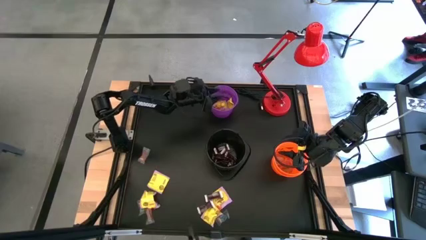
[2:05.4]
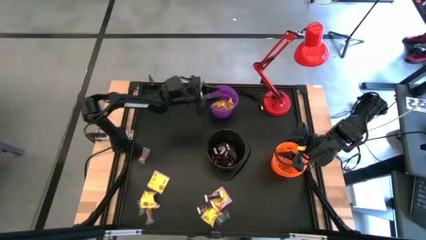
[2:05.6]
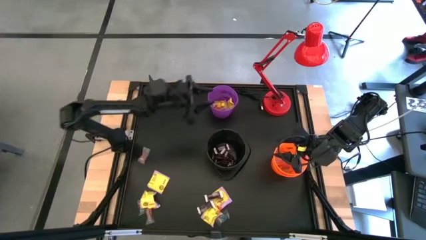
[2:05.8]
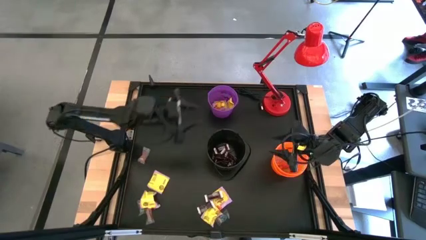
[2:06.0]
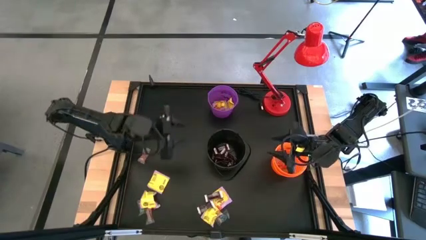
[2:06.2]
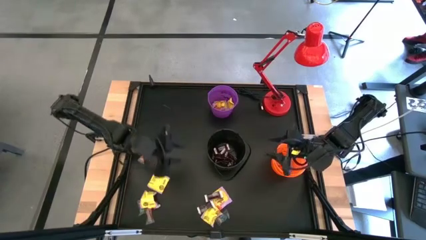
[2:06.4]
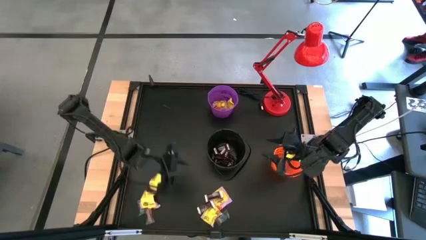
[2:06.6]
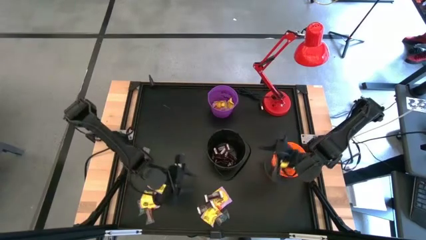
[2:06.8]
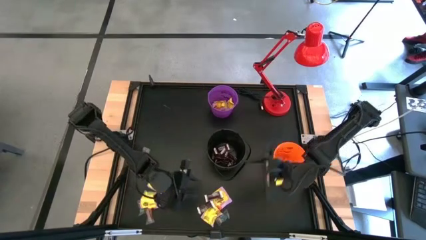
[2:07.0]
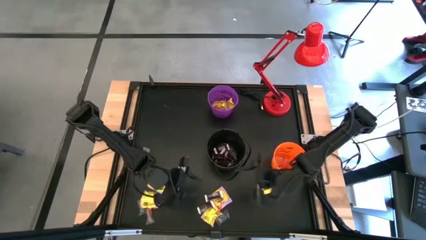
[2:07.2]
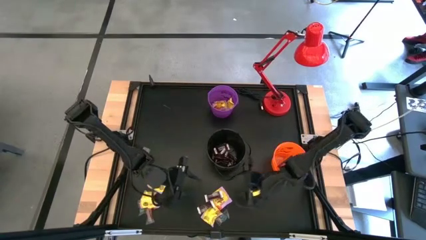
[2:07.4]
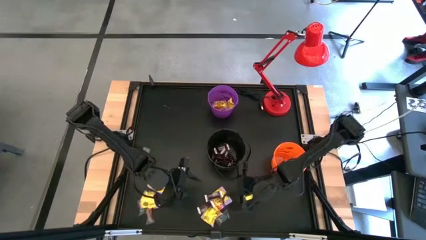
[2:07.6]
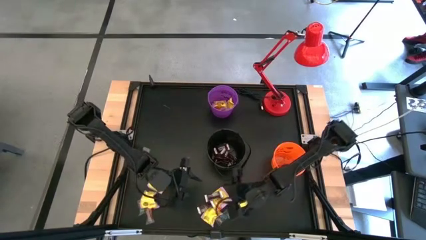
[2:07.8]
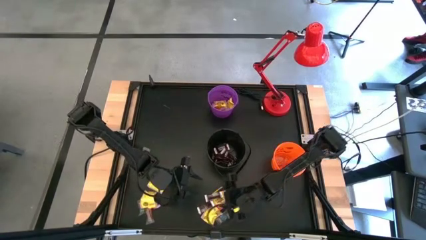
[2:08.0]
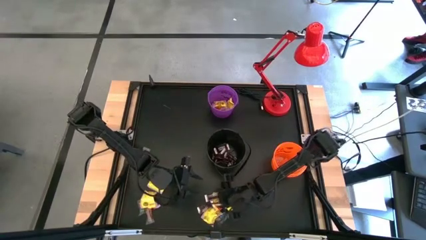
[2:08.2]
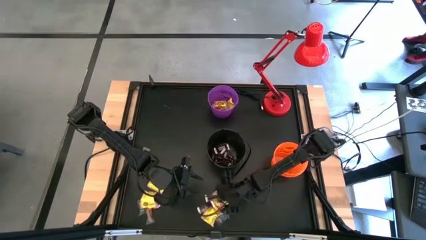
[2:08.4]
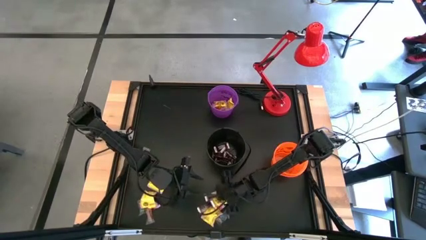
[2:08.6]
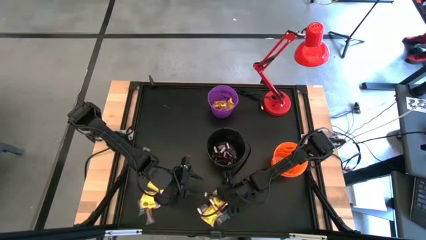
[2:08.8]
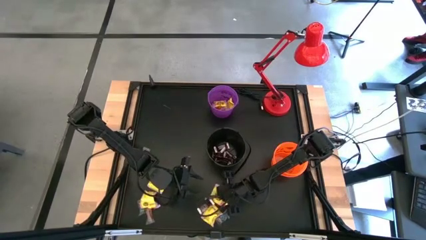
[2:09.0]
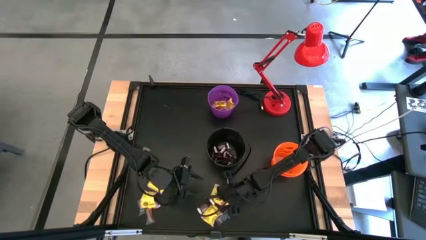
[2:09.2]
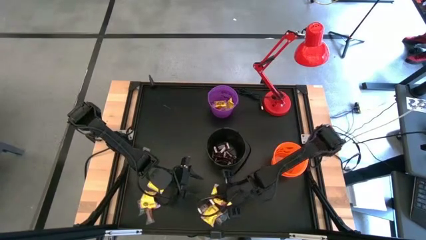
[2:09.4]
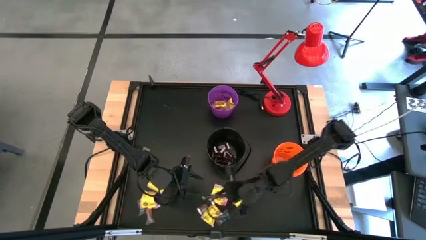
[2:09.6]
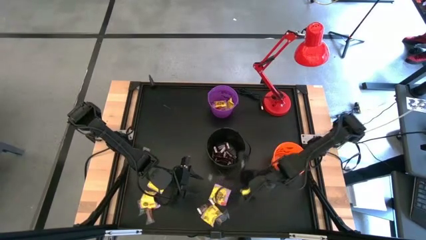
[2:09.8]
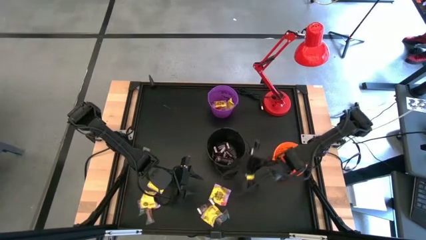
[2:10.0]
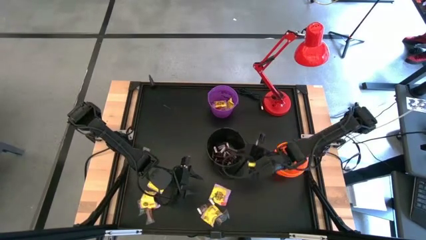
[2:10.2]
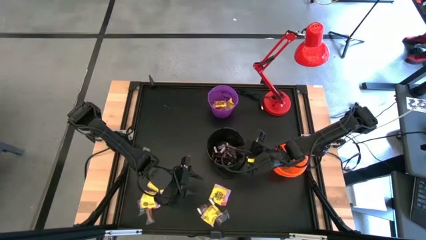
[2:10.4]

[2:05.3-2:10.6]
Task: Sort candy
Put the brown chocolate into the black bucket

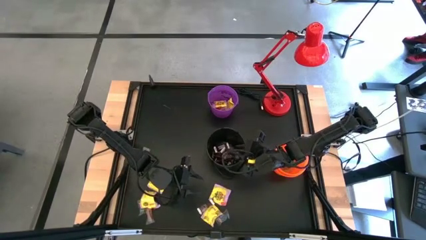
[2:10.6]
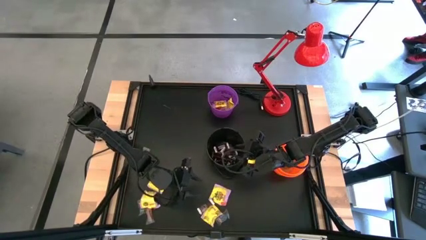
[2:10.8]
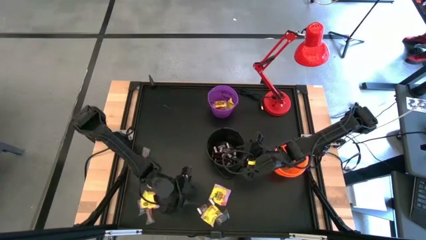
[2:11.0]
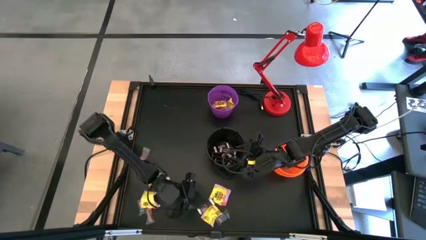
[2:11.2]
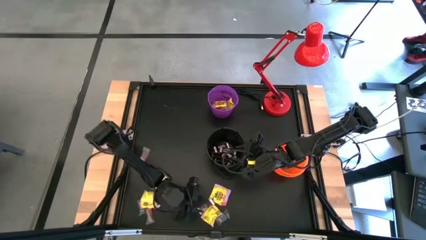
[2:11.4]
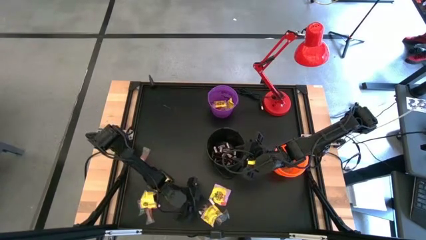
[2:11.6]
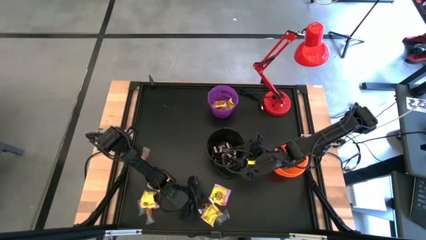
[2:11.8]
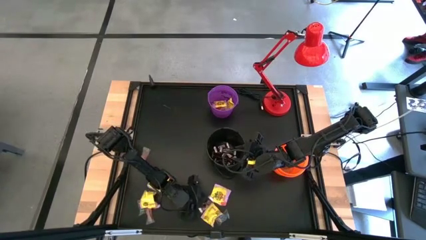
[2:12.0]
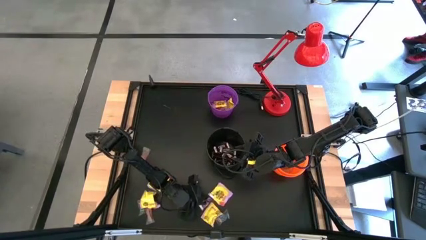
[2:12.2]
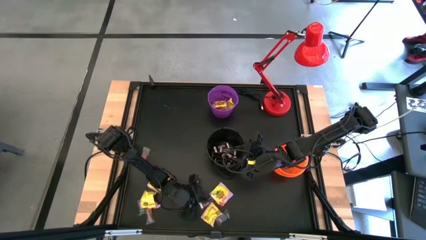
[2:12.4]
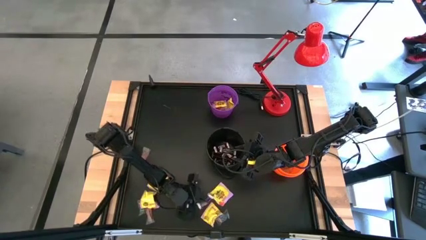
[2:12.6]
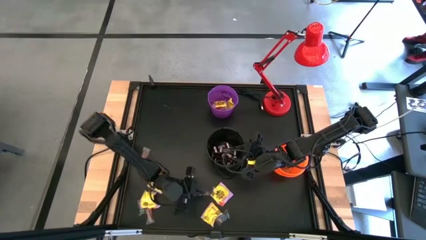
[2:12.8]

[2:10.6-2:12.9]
Put the brown chocolate into the black bucket

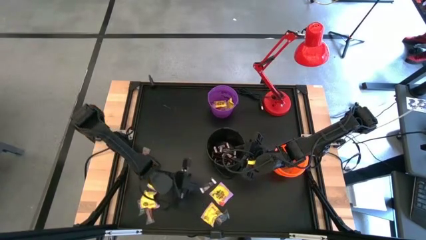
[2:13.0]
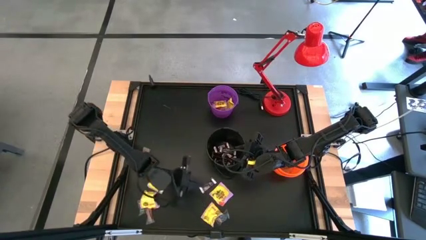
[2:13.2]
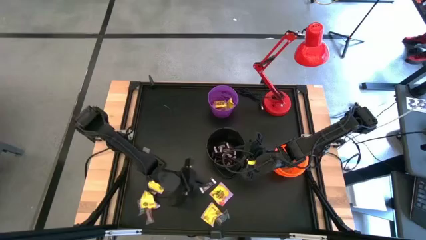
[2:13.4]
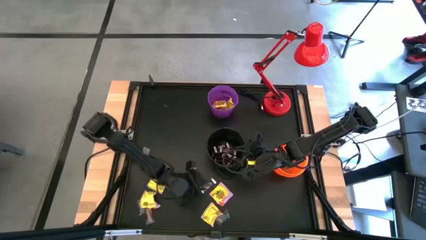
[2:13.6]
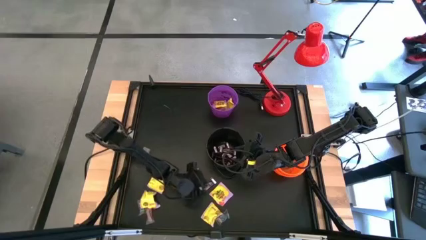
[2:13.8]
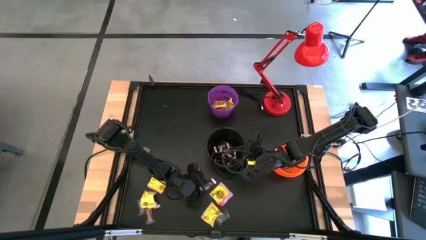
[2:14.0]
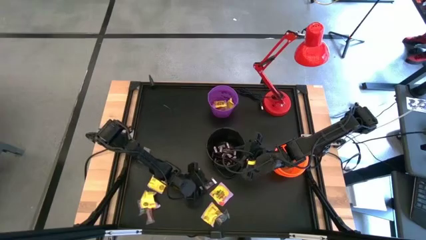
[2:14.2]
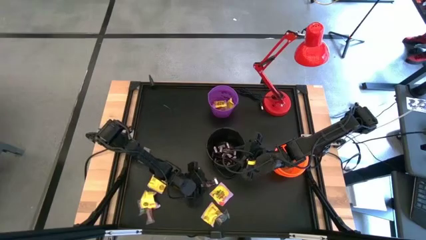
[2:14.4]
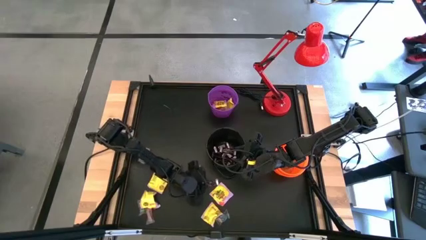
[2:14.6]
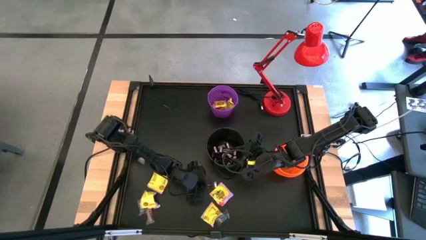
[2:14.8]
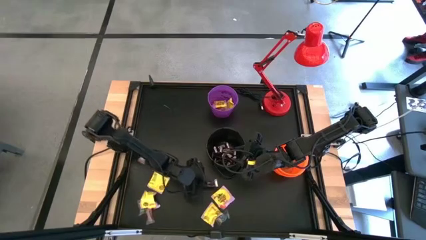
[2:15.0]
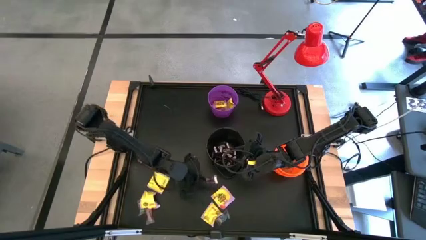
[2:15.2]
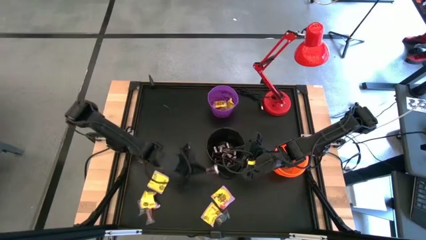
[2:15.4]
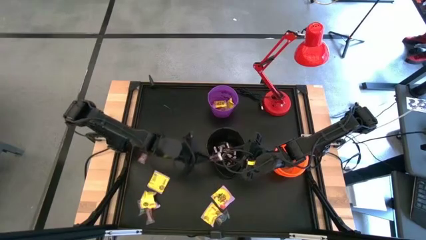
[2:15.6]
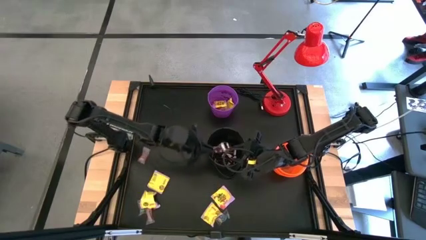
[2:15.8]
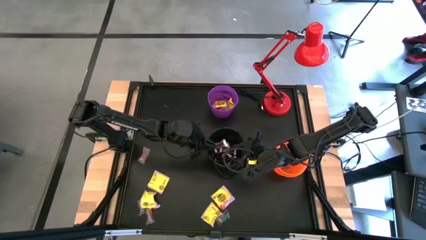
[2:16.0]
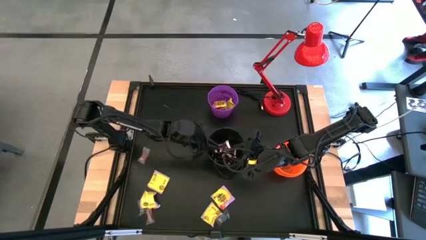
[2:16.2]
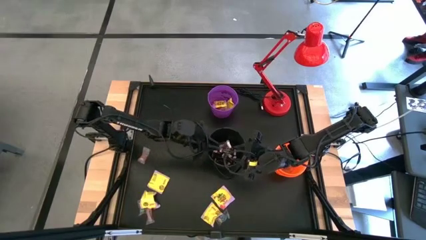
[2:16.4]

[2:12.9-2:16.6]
Put the brown chocolate into the black bucket

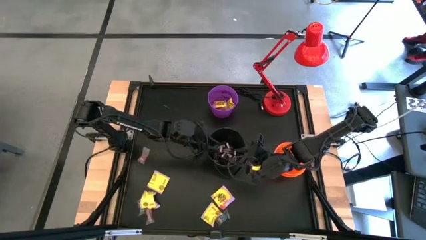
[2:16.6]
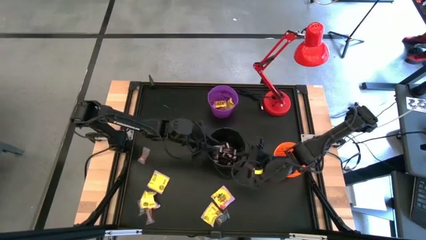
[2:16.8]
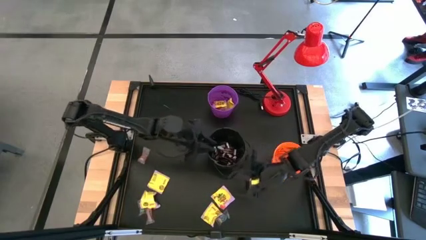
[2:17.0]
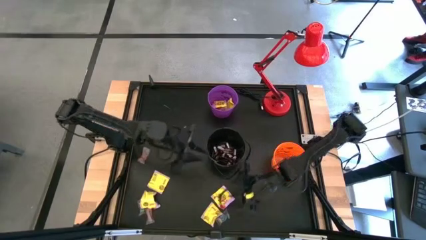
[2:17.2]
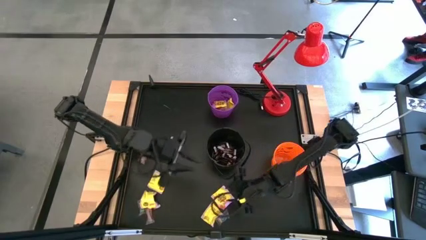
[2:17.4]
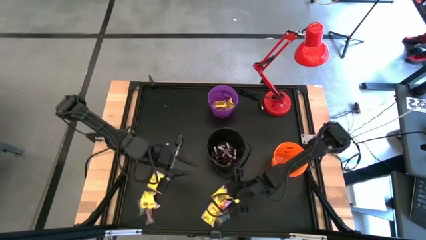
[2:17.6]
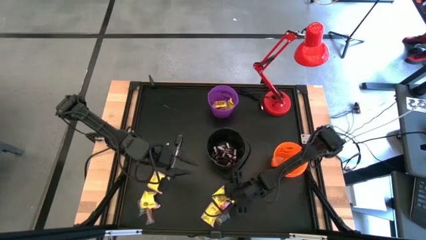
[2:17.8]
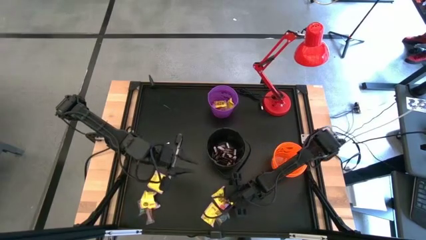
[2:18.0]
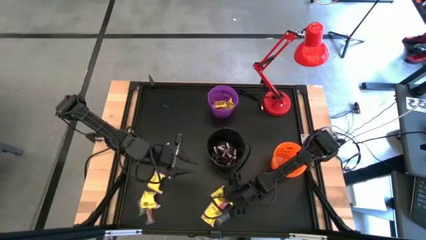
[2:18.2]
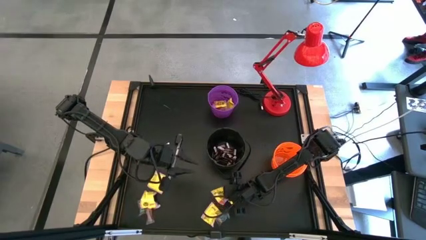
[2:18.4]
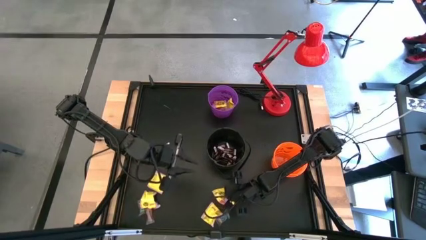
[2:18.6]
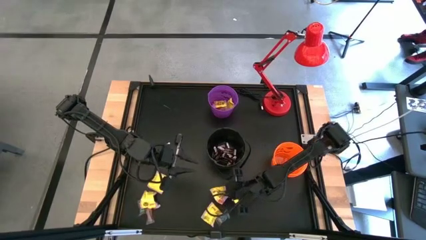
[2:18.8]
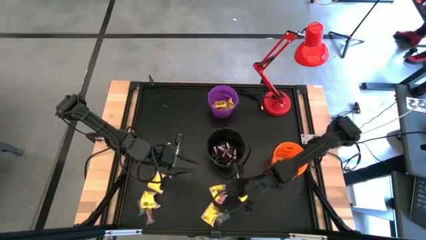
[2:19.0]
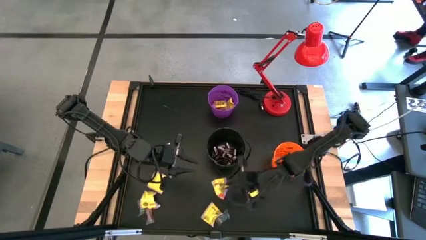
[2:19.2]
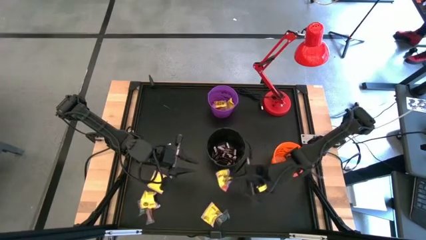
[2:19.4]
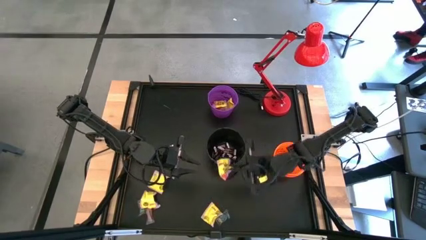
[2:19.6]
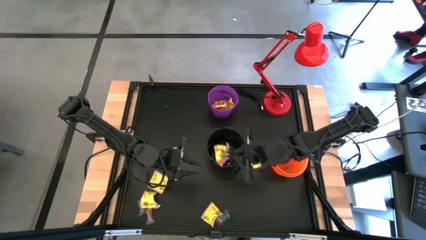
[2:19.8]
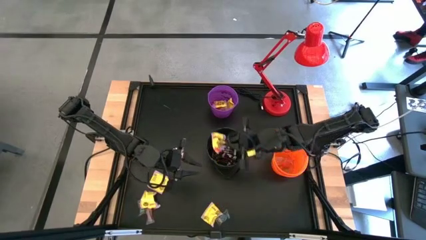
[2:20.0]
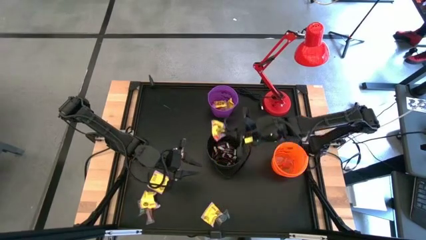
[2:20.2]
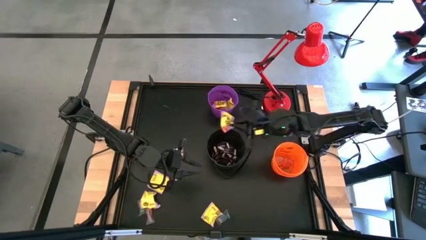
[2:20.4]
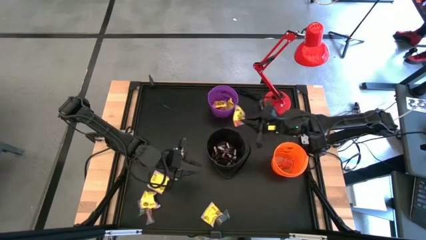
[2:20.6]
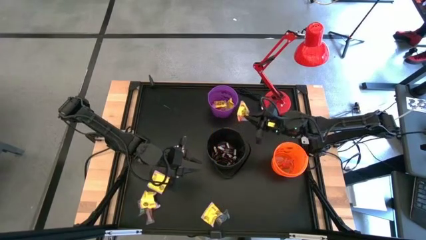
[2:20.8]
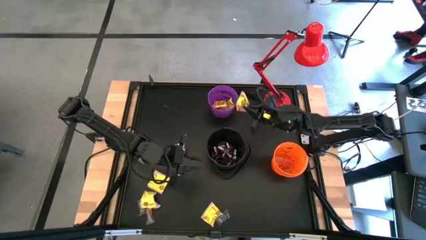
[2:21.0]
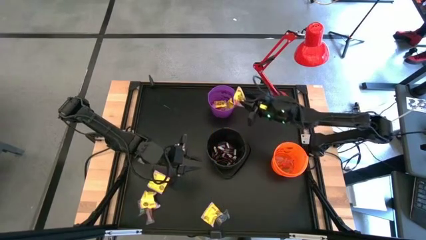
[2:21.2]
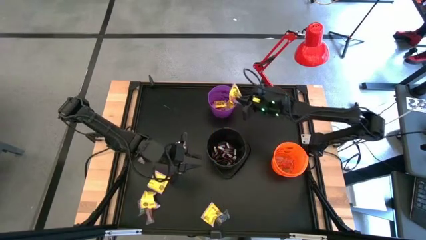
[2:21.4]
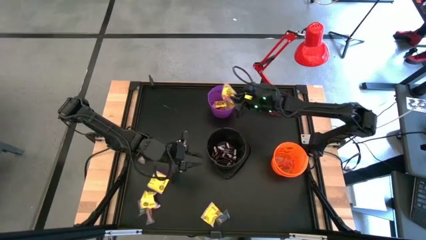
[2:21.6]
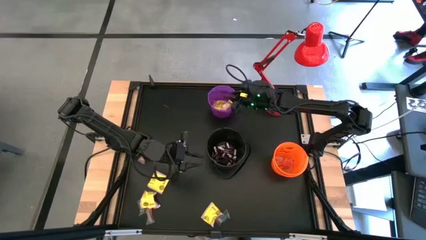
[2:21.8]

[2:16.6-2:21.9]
Put the yellow candy into the purple bucket
